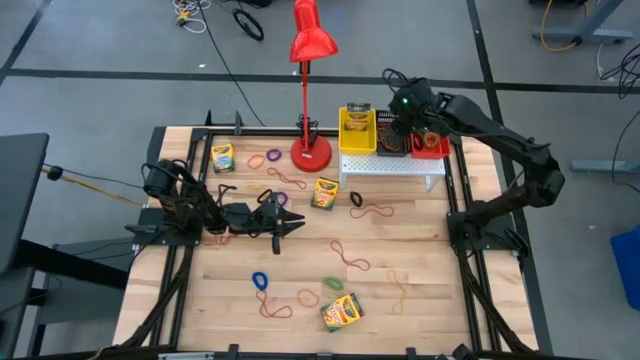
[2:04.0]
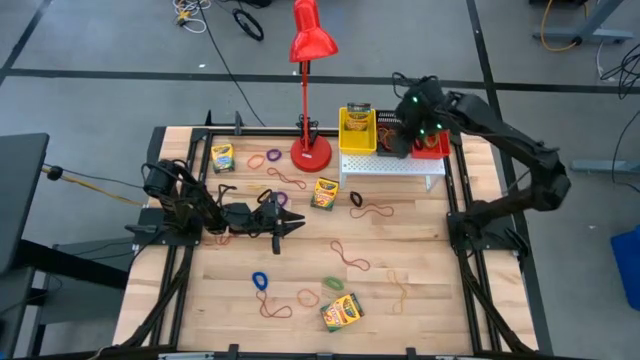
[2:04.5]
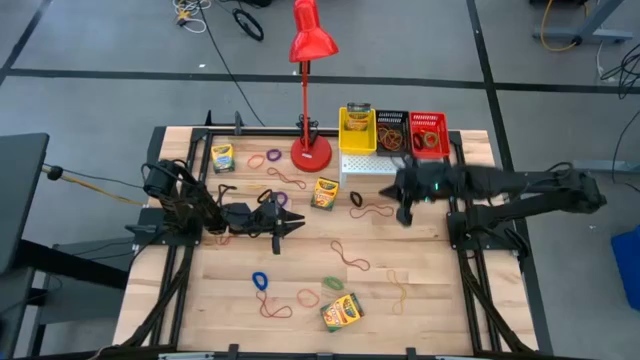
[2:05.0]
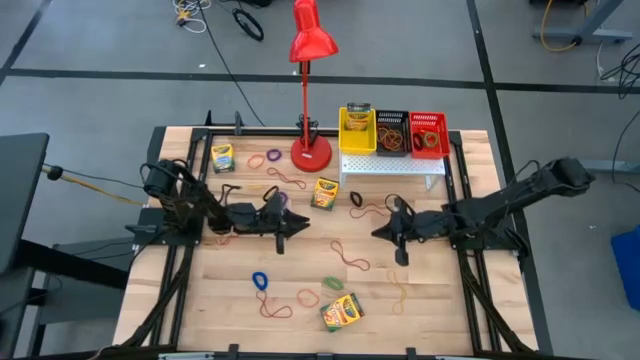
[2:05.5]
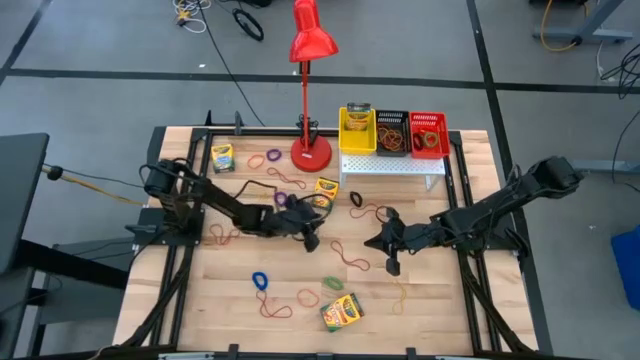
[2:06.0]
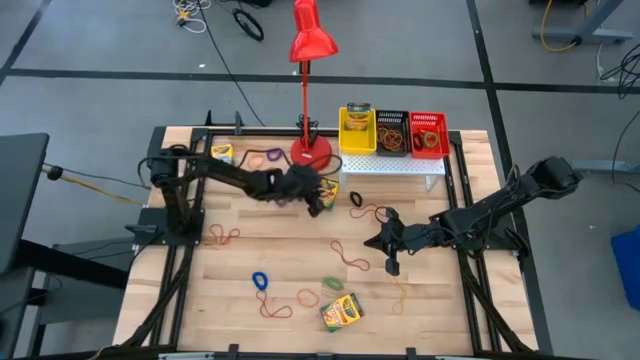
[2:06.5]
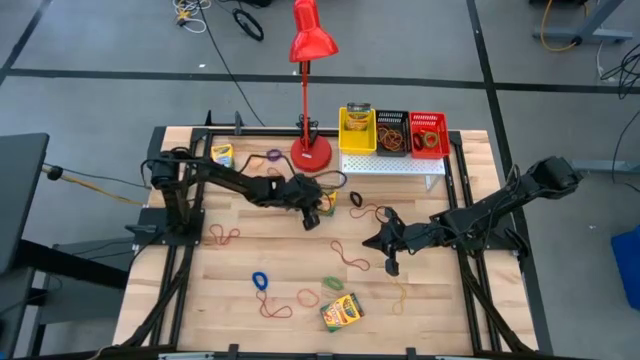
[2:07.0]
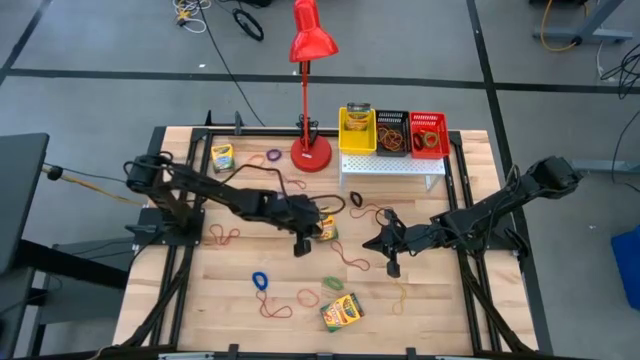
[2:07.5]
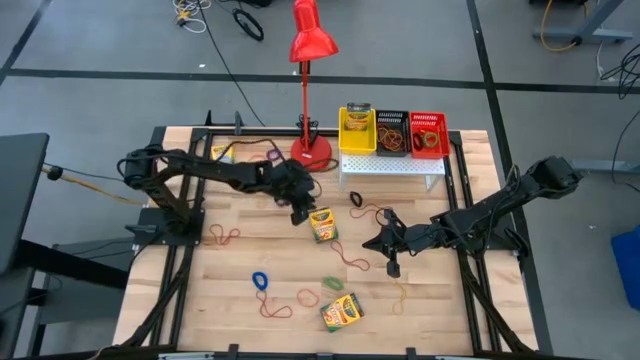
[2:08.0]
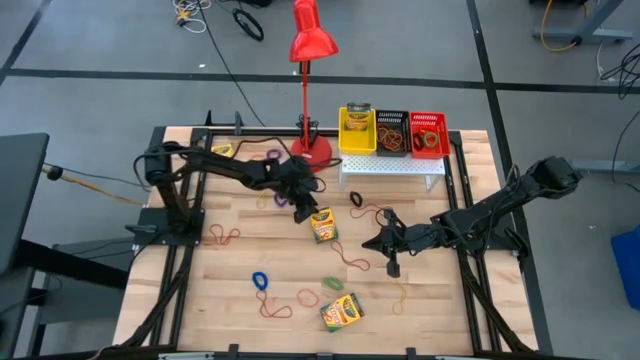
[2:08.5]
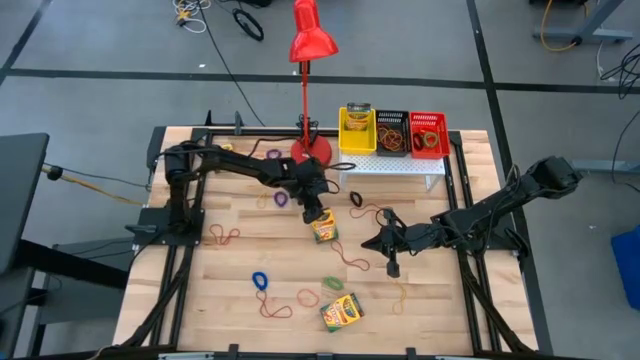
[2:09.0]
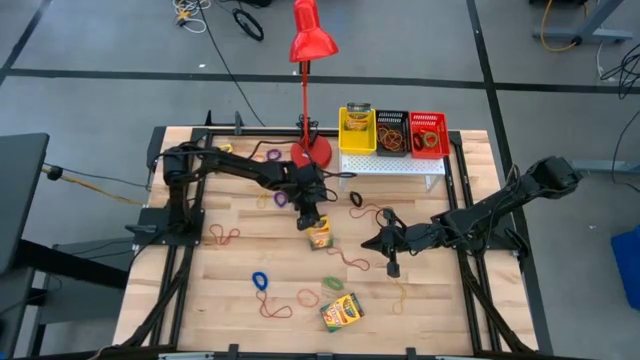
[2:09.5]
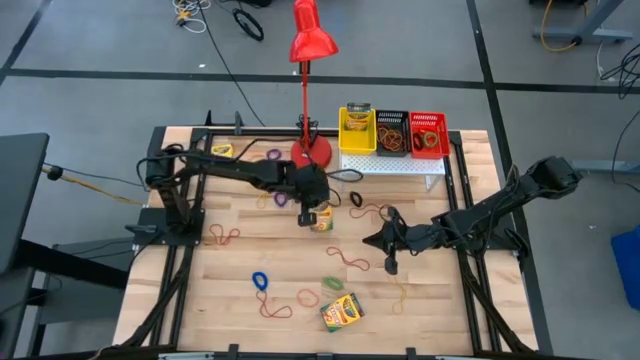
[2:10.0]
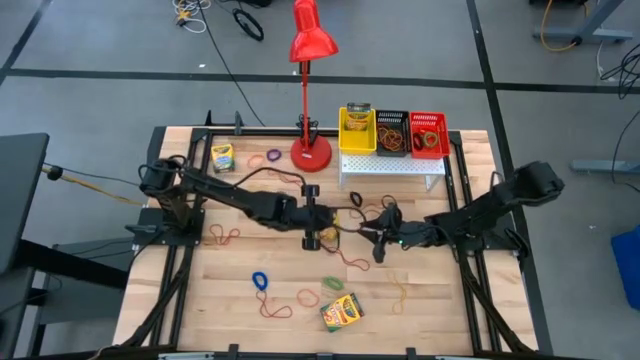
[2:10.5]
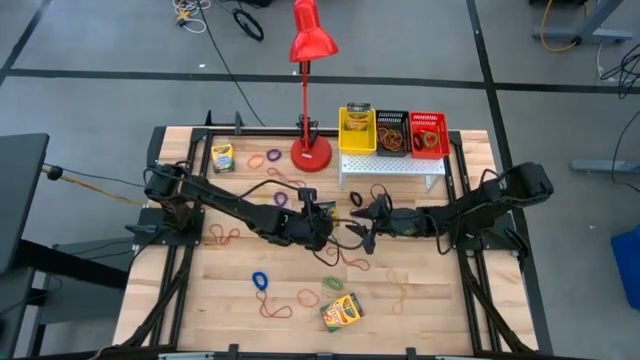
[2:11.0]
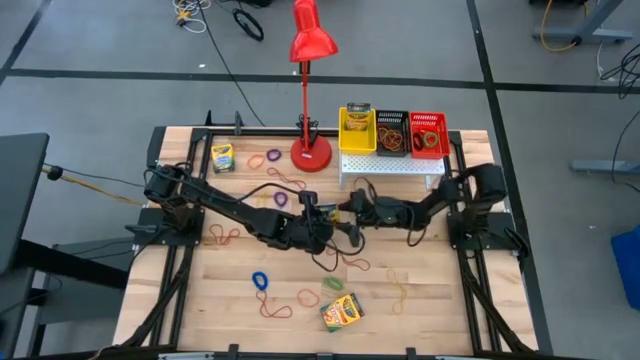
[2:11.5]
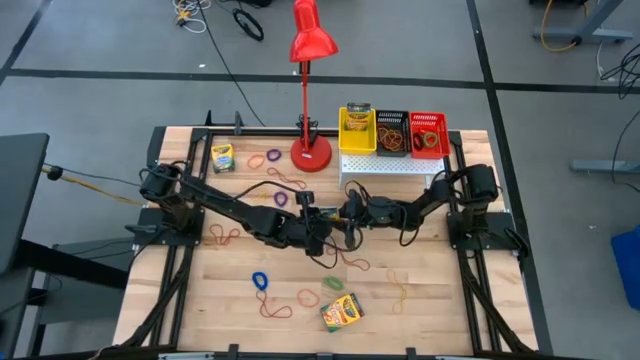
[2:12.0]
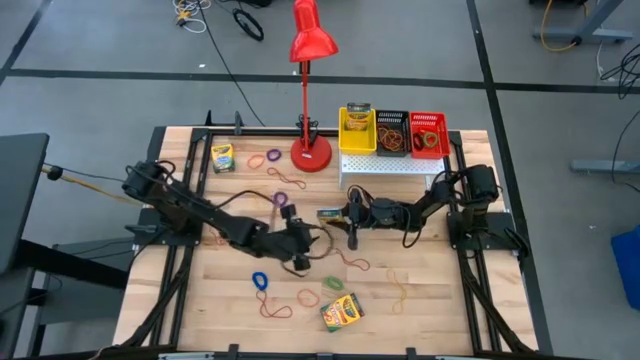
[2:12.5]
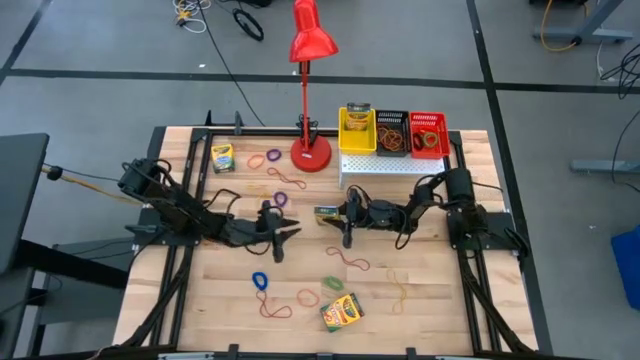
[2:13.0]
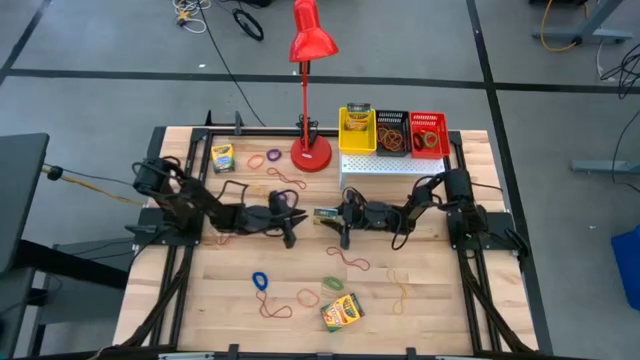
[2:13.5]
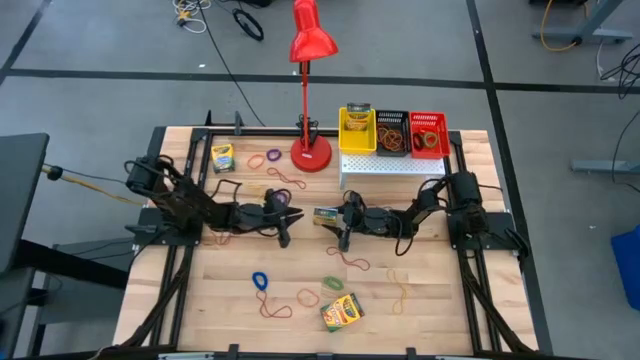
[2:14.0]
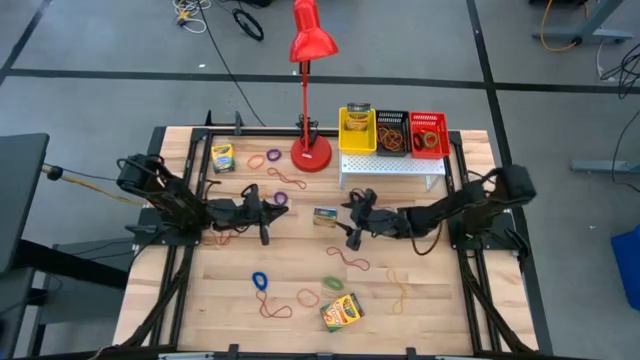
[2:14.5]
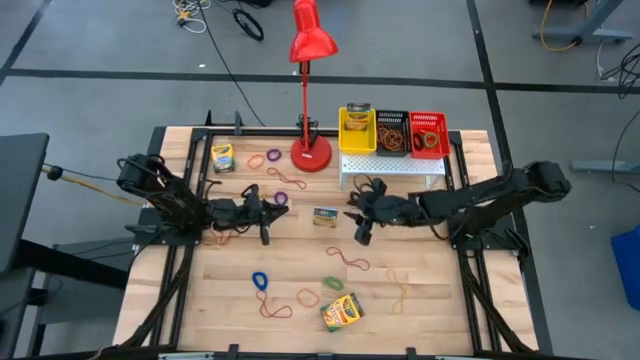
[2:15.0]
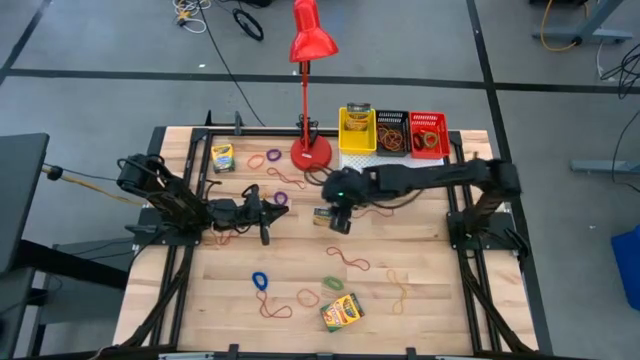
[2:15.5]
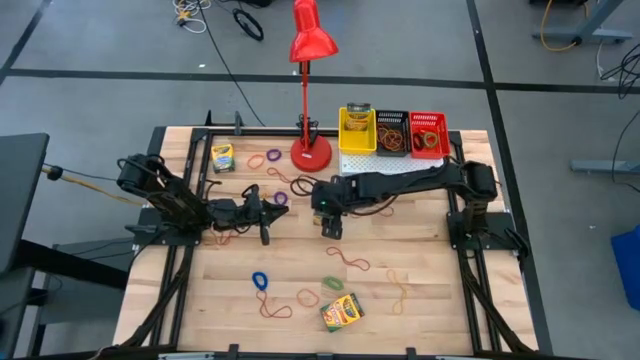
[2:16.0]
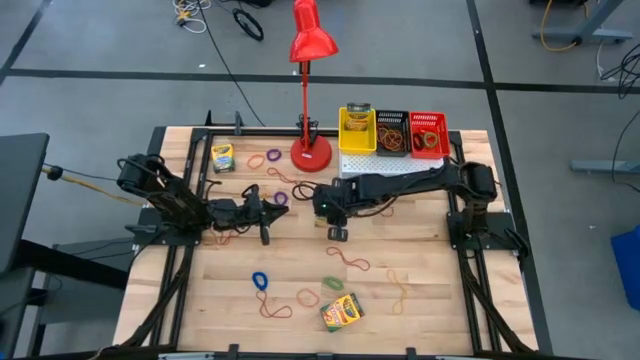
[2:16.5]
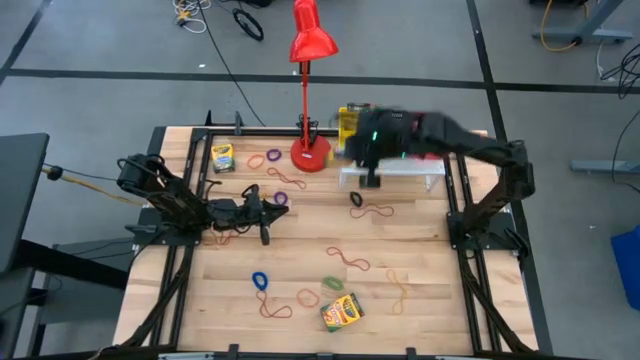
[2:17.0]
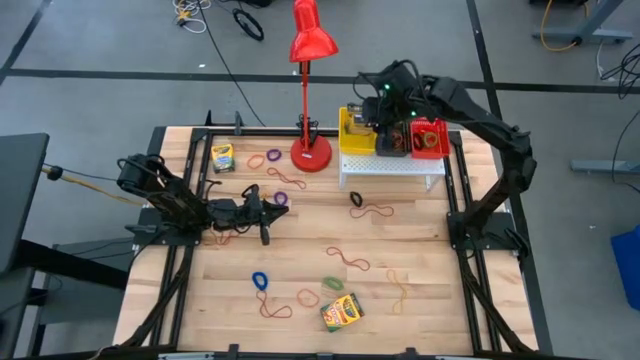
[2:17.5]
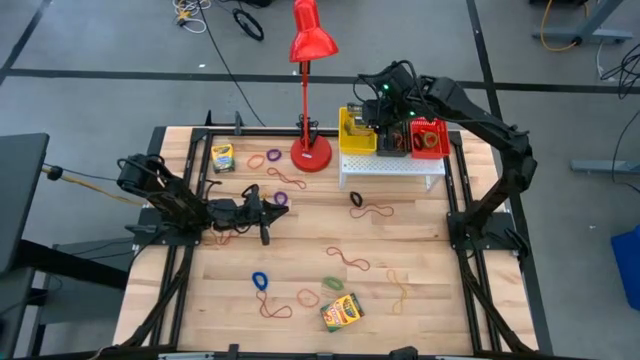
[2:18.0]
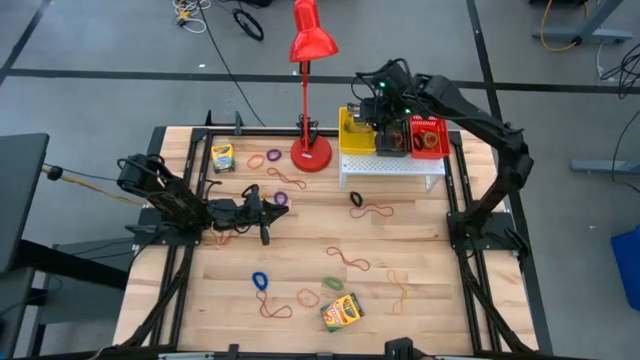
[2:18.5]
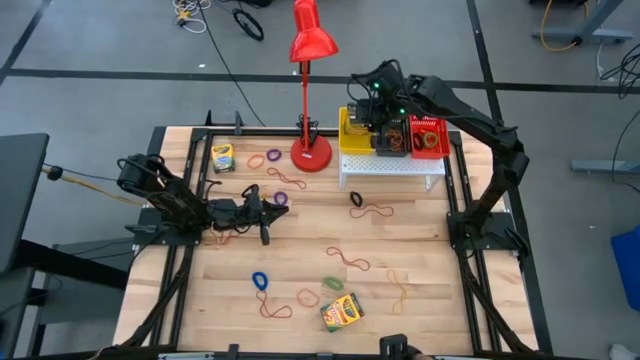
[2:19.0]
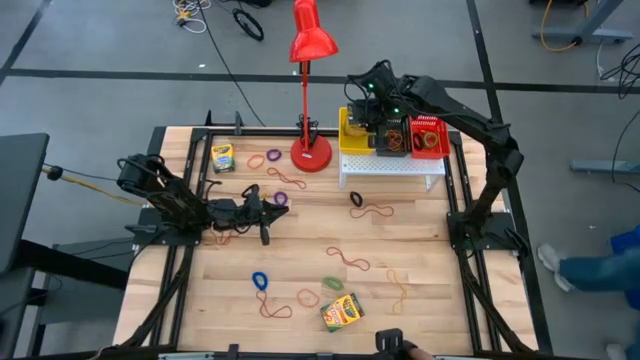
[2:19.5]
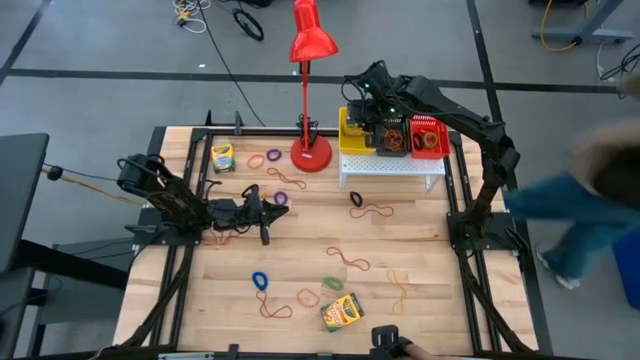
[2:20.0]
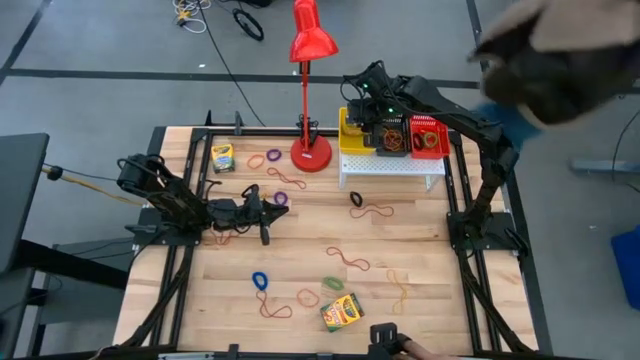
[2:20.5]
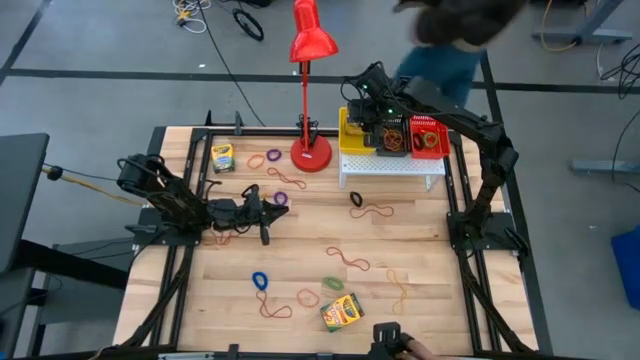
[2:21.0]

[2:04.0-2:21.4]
Task: Pick & Place Office Desk Supplies
Put the crayon box into the yellow bin on the shelf

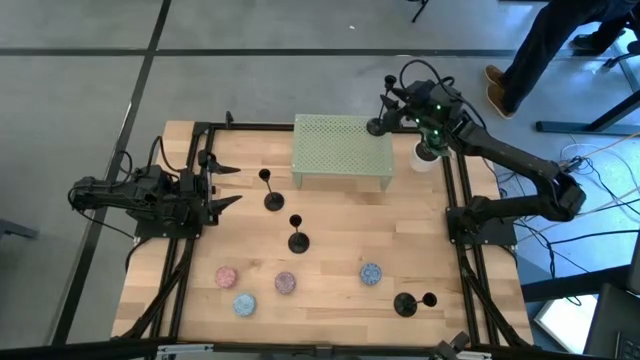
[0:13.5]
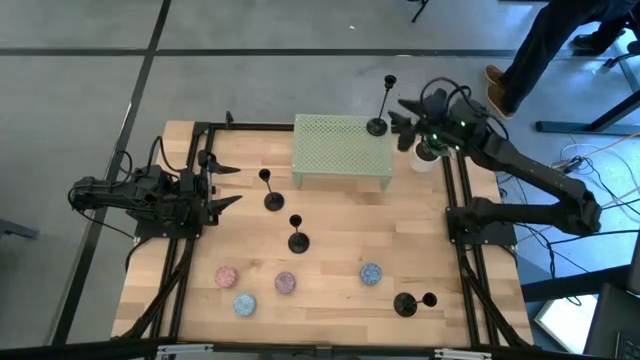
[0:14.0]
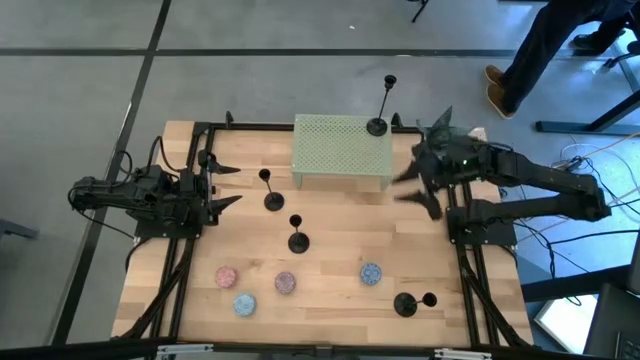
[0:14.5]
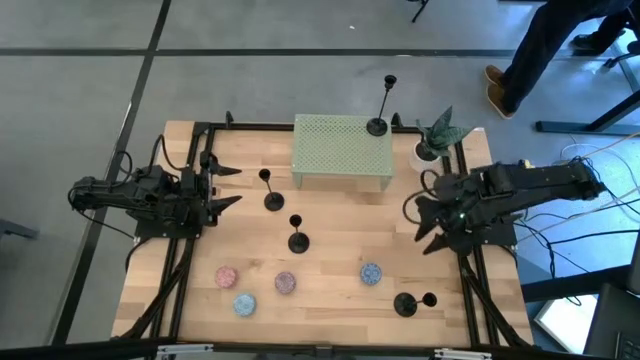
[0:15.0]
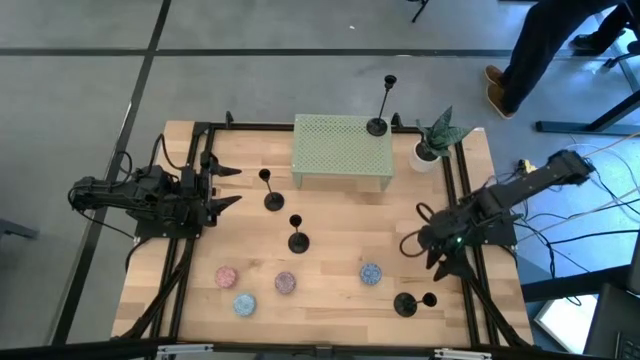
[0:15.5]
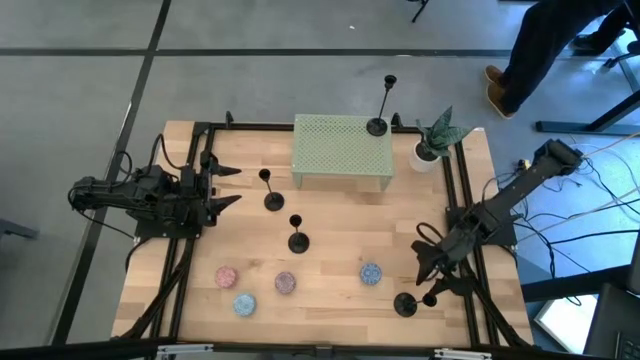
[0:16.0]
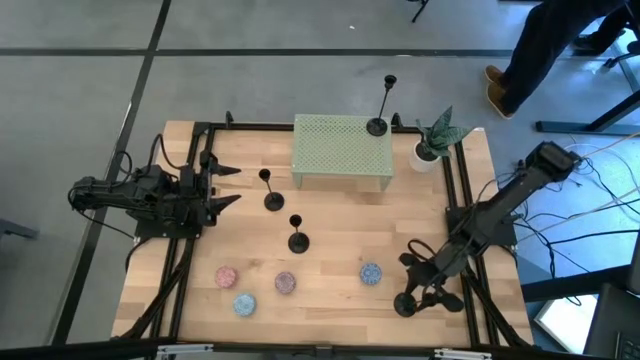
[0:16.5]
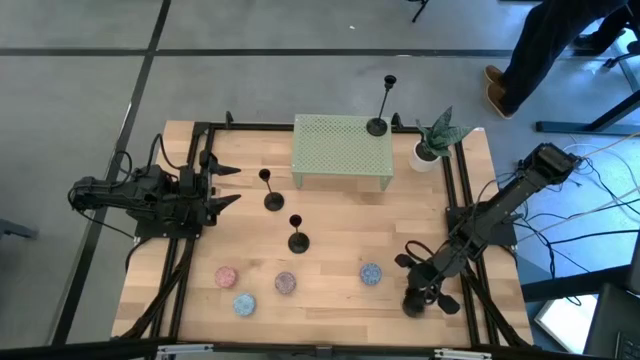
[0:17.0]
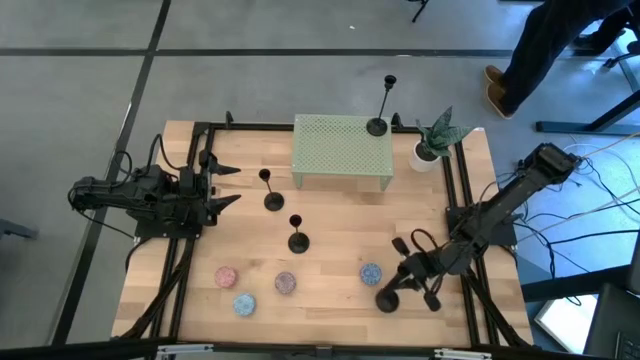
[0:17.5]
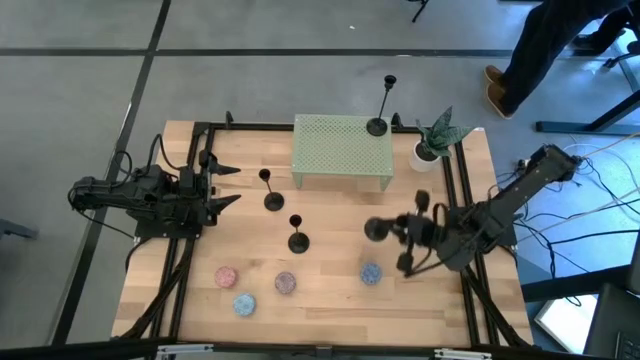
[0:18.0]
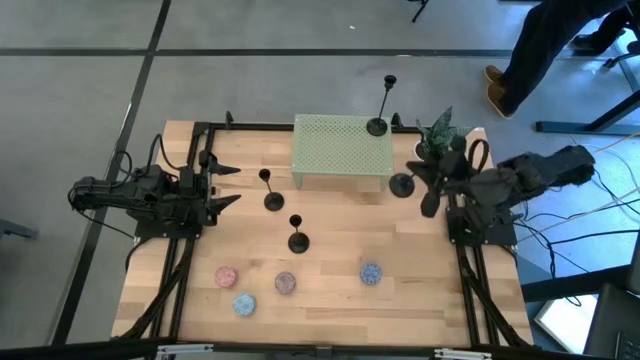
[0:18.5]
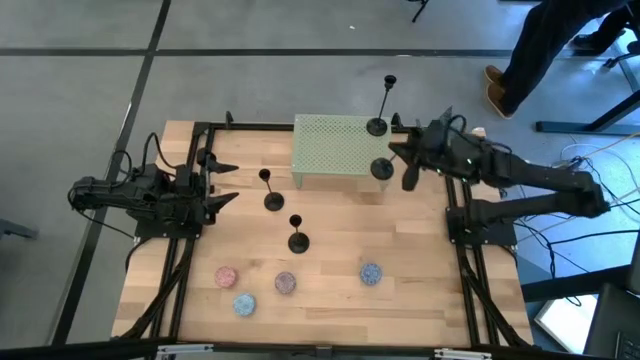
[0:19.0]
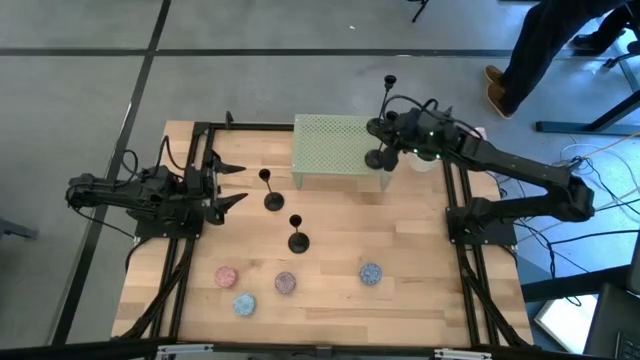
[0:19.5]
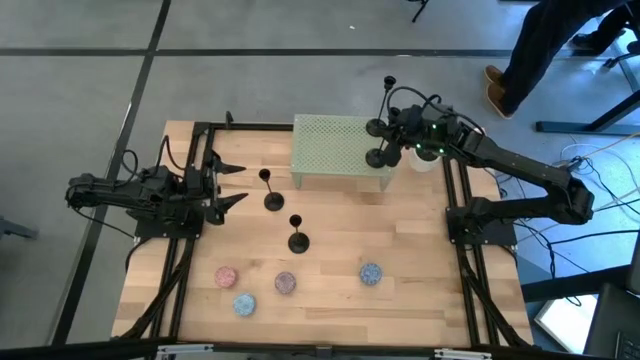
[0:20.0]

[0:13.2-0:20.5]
Task: Pick & Place candle stick holders
Align the black candle holder with the black candle holder on the shelf
